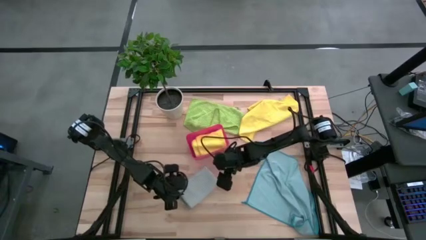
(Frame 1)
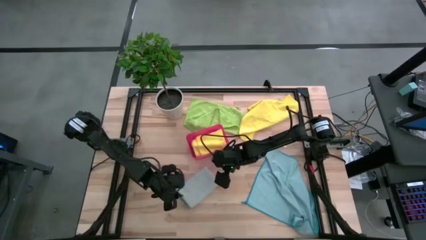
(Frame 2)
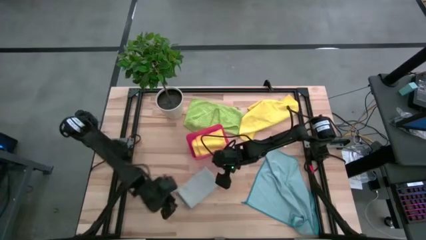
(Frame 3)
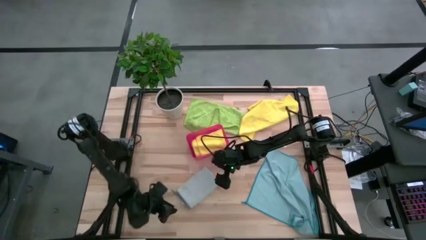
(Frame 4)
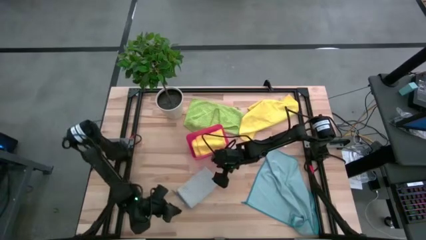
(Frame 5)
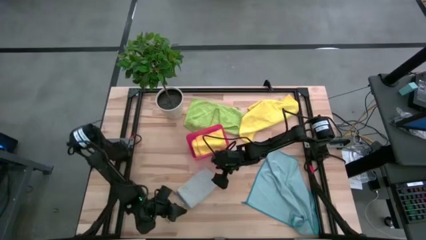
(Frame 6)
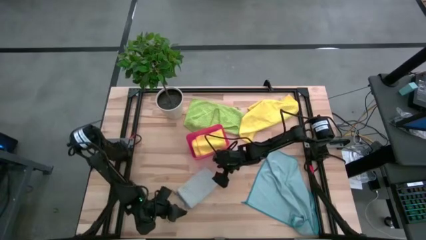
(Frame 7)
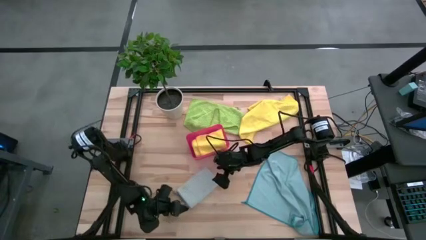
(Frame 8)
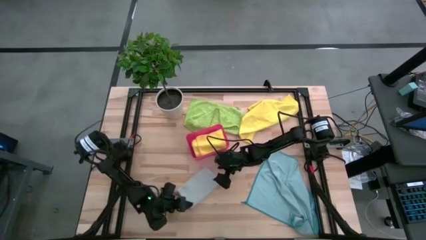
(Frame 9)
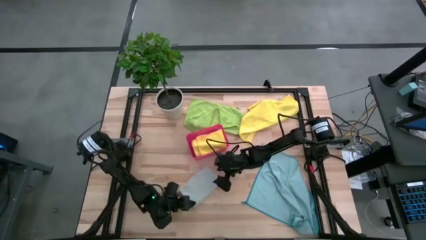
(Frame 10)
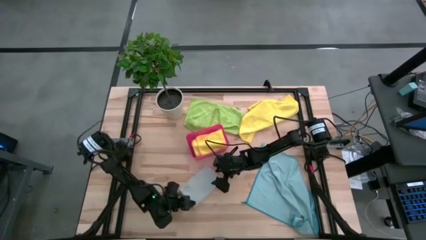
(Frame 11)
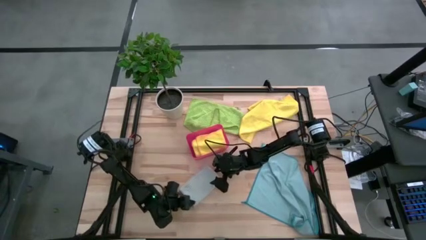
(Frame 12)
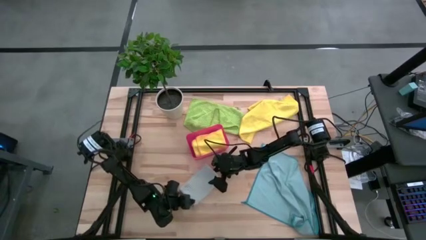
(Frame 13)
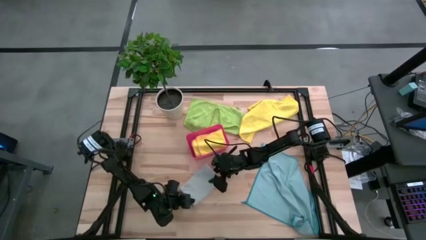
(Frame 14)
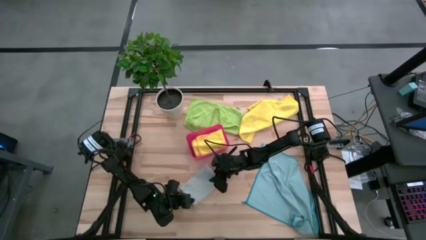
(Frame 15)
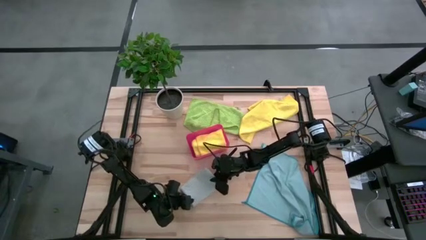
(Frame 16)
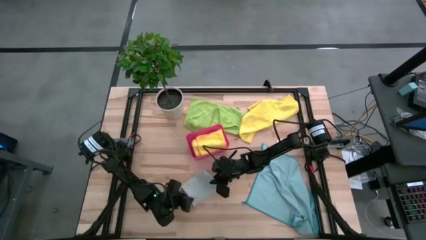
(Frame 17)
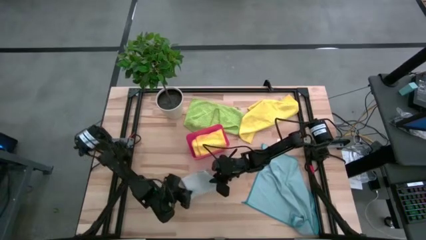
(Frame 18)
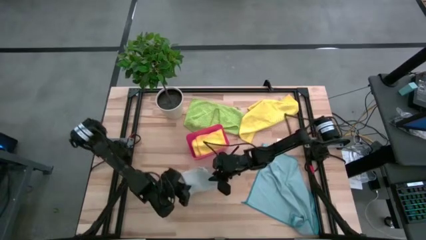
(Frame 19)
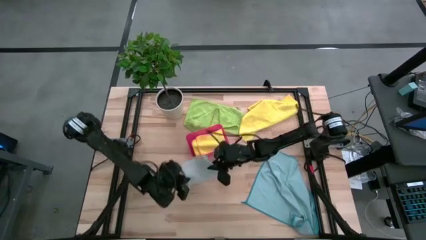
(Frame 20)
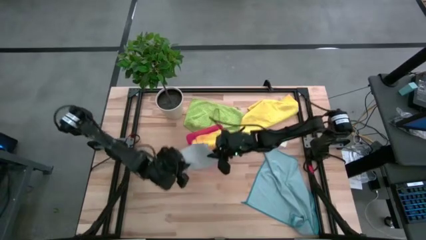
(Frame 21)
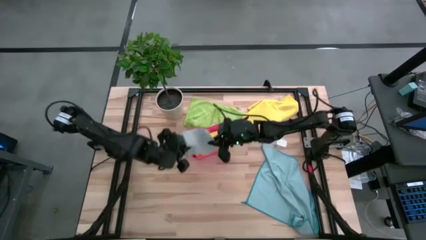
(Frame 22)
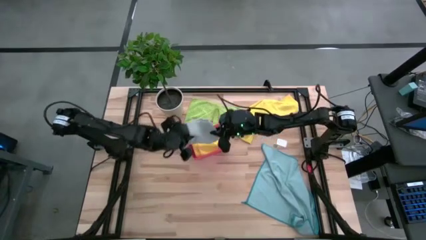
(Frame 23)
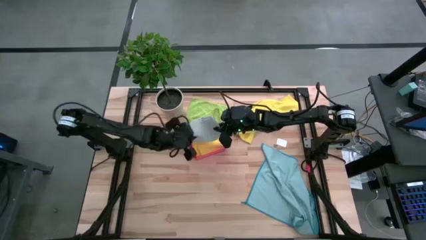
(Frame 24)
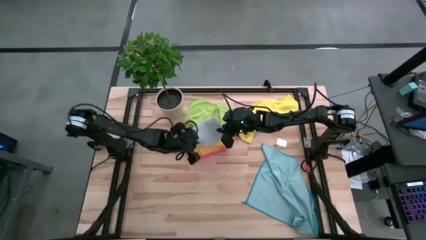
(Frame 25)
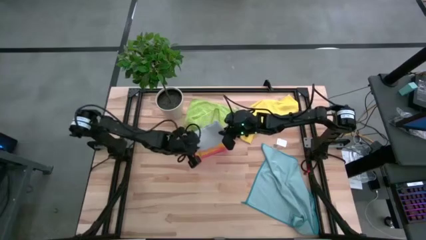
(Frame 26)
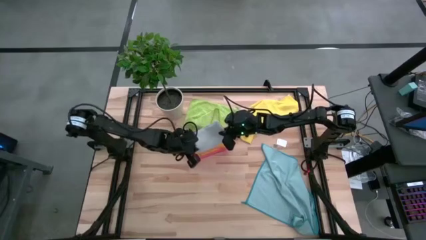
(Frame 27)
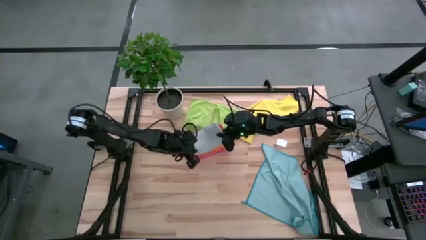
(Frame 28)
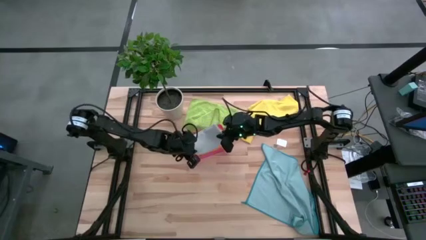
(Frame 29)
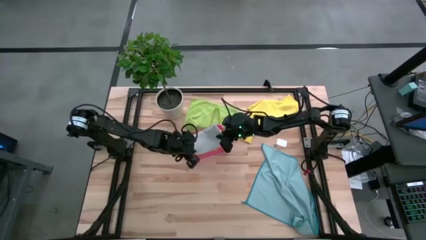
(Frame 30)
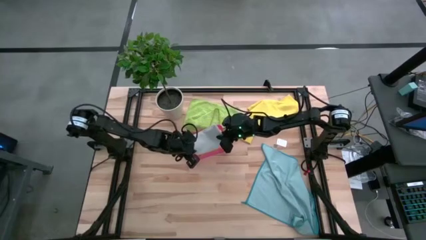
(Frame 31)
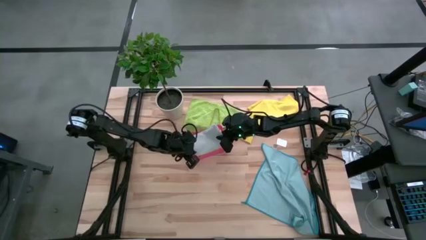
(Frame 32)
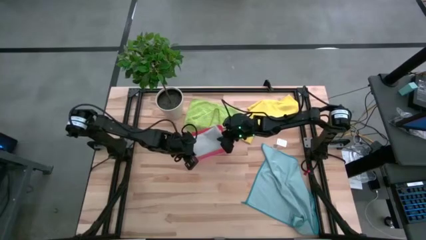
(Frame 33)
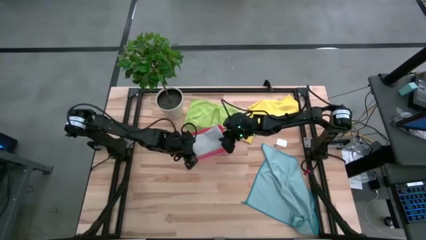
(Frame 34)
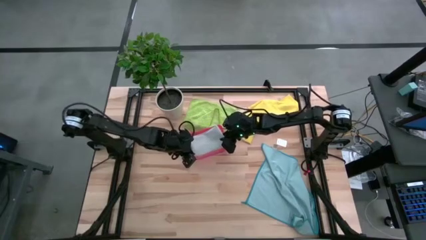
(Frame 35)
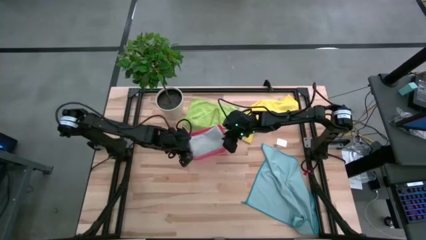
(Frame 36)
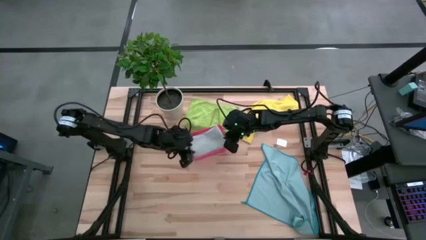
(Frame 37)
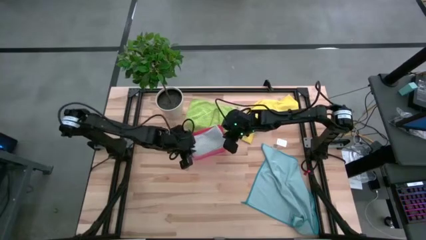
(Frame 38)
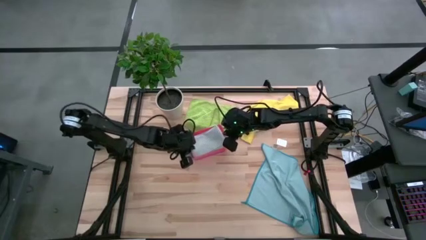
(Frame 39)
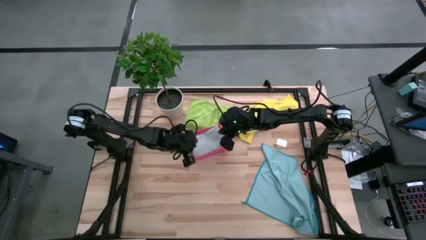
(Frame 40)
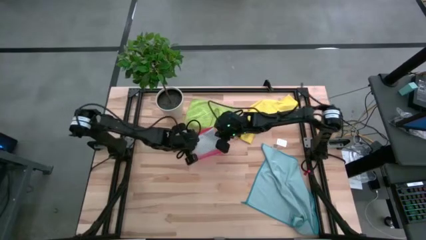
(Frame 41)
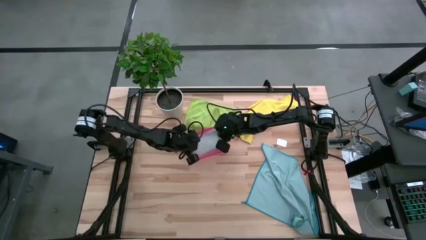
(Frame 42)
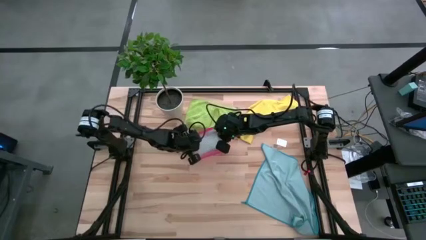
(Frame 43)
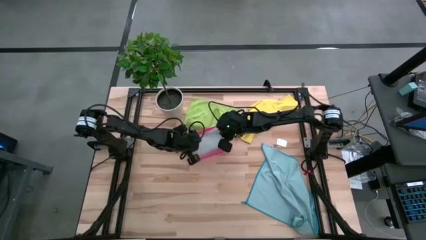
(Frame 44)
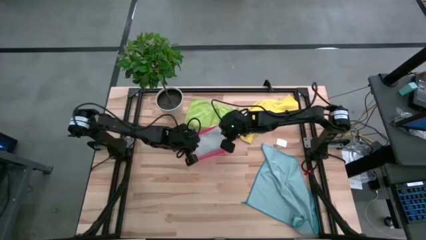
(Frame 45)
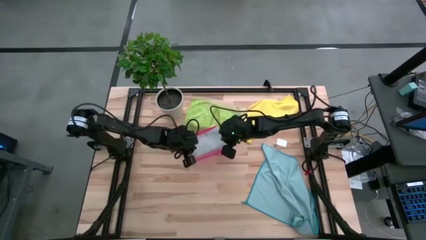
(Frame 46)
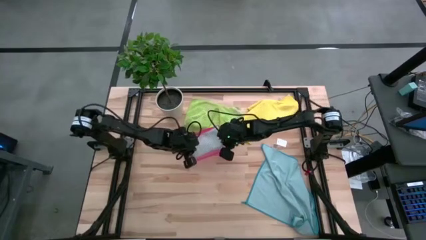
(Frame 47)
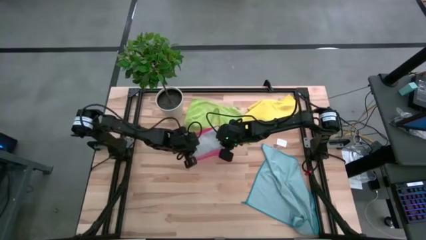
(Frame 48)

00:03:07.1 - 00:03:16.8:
Task: Fold microfiber towels
Put the folded gray towel into the pink bin

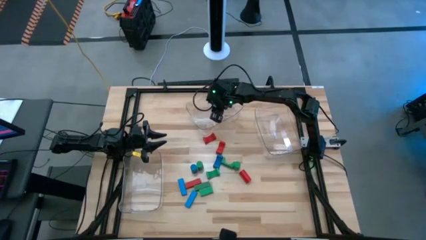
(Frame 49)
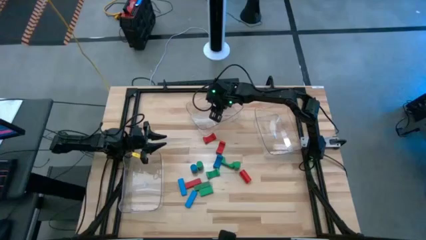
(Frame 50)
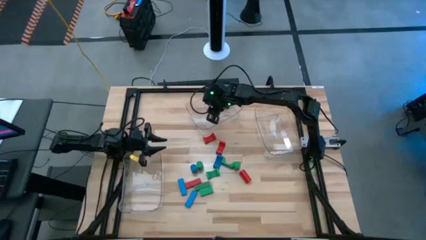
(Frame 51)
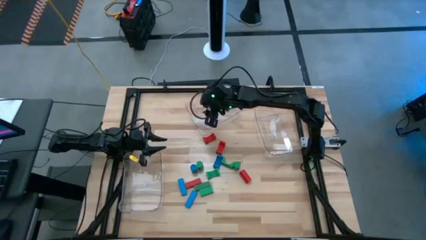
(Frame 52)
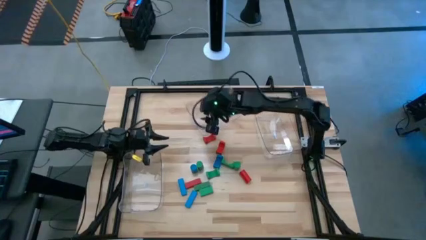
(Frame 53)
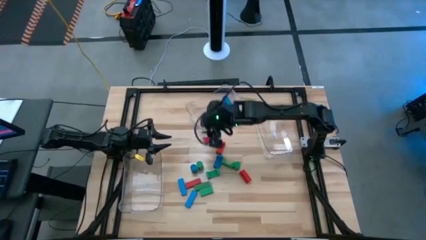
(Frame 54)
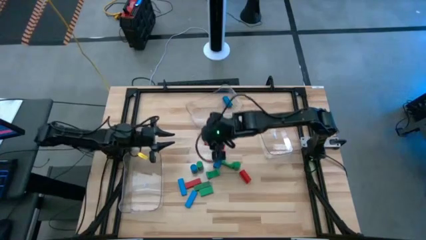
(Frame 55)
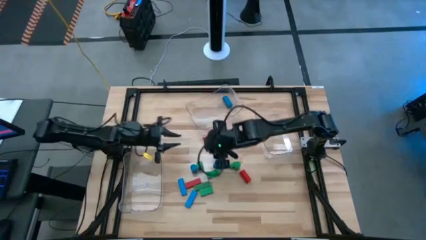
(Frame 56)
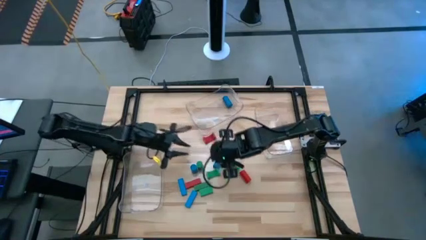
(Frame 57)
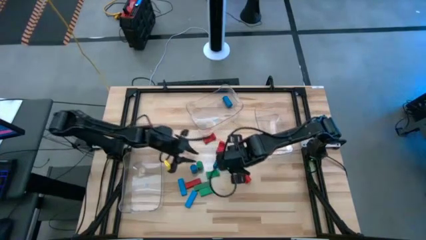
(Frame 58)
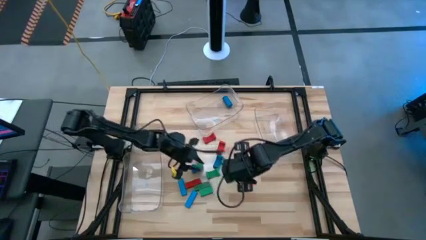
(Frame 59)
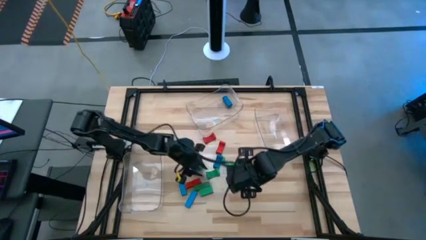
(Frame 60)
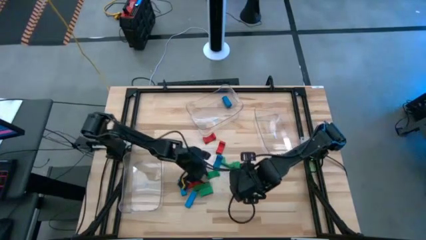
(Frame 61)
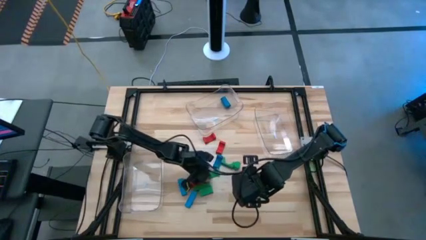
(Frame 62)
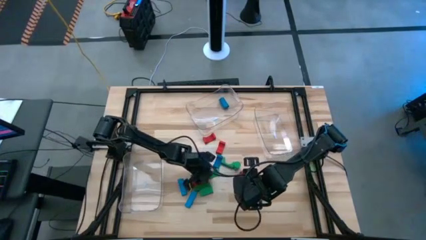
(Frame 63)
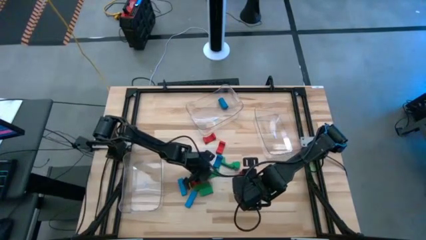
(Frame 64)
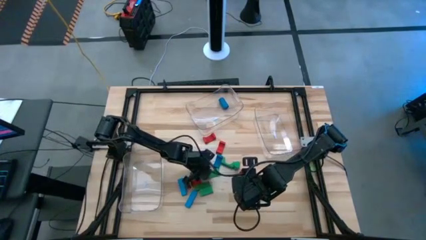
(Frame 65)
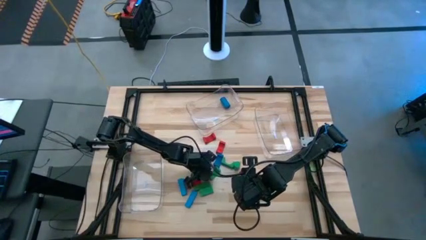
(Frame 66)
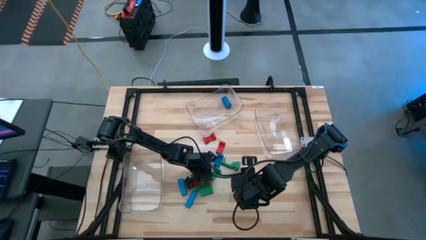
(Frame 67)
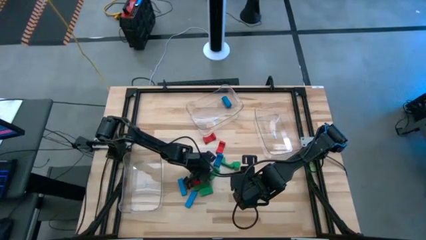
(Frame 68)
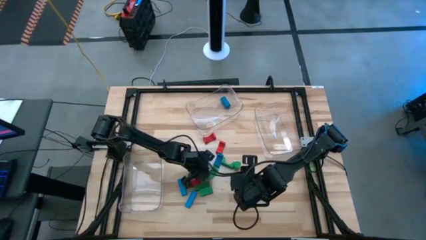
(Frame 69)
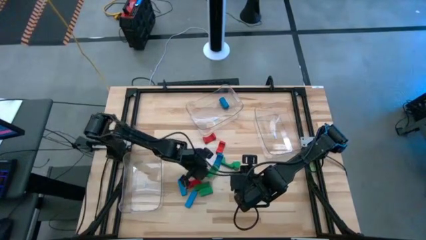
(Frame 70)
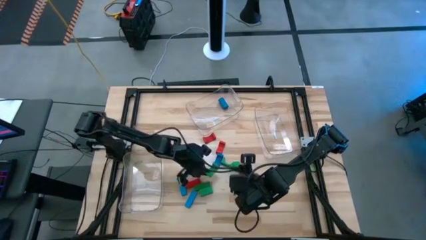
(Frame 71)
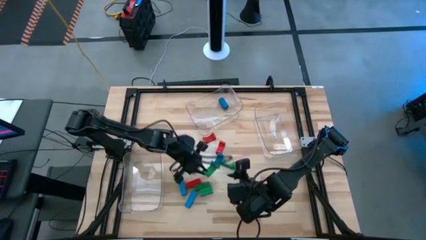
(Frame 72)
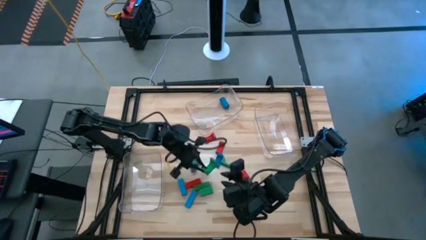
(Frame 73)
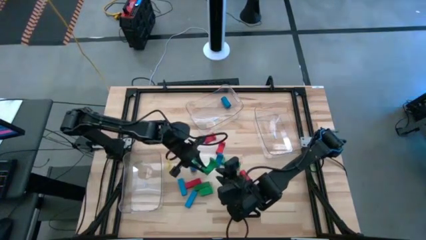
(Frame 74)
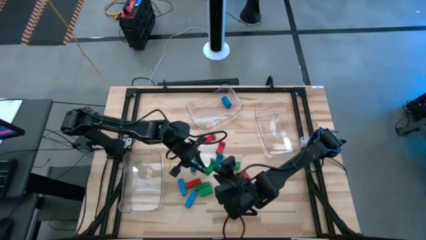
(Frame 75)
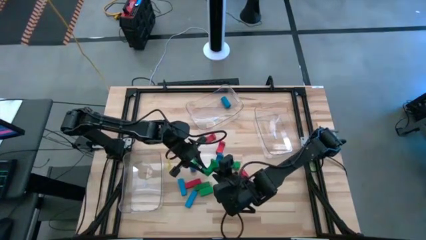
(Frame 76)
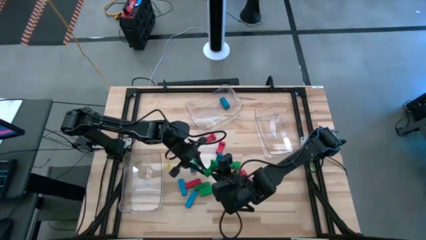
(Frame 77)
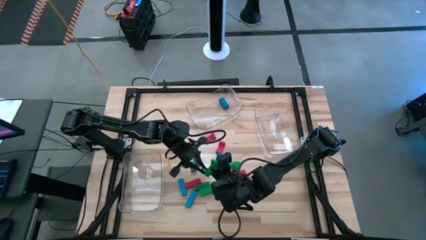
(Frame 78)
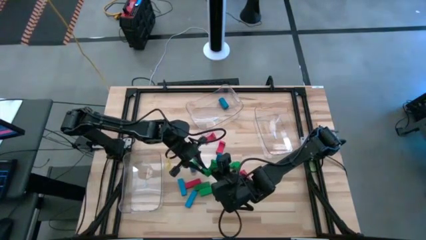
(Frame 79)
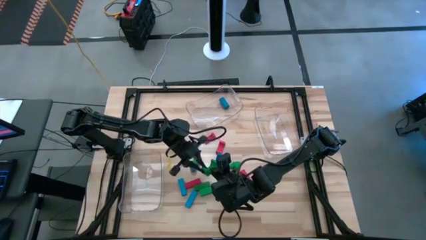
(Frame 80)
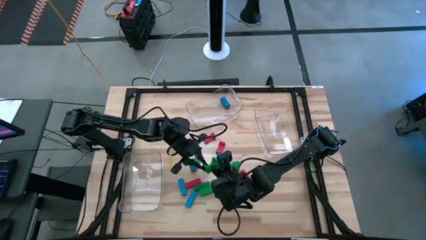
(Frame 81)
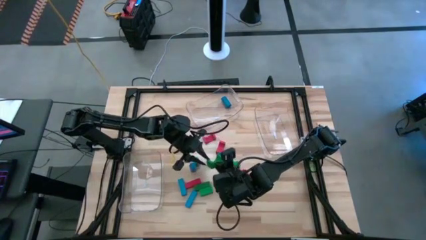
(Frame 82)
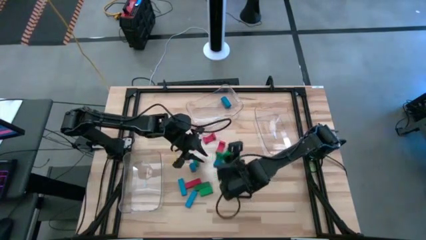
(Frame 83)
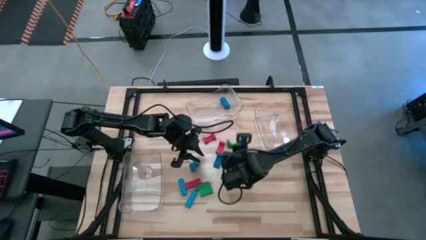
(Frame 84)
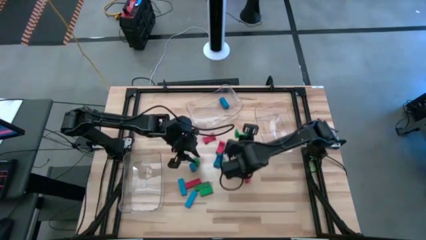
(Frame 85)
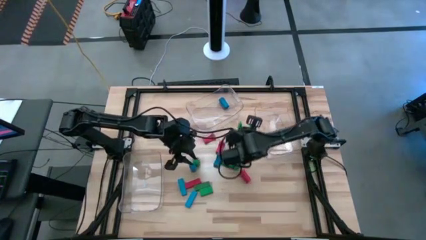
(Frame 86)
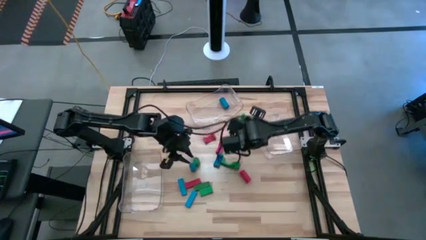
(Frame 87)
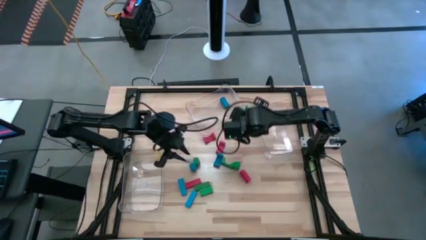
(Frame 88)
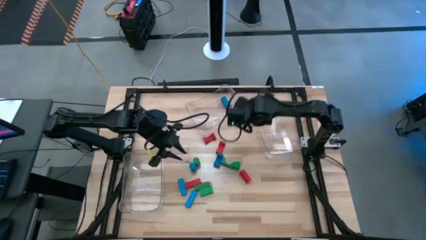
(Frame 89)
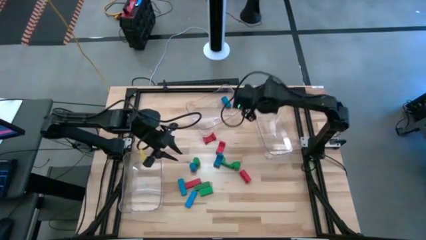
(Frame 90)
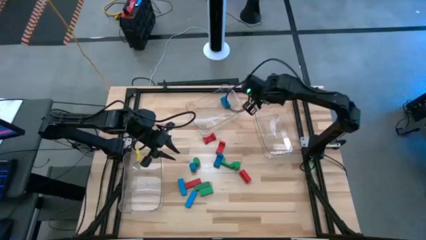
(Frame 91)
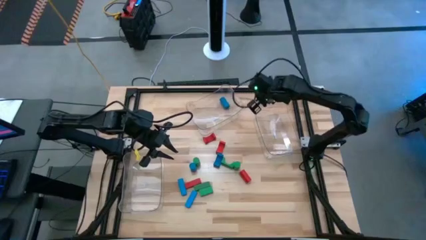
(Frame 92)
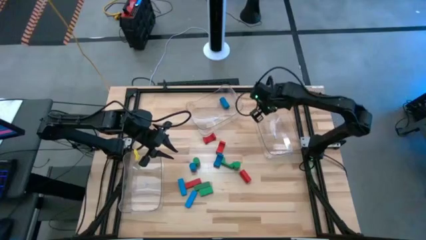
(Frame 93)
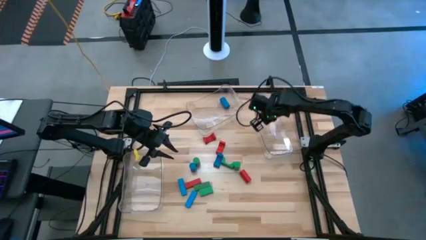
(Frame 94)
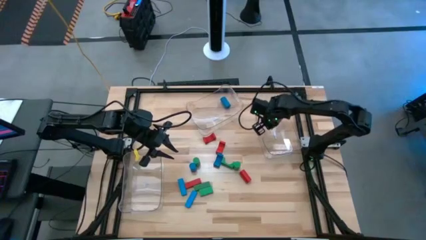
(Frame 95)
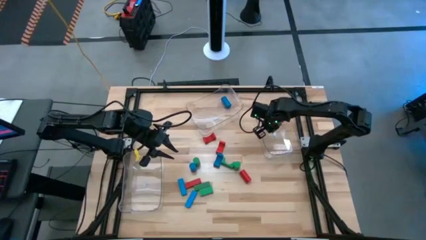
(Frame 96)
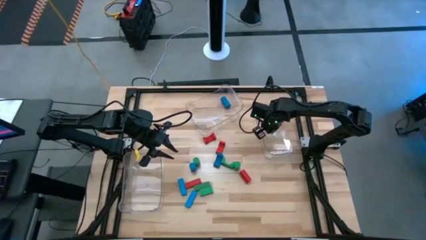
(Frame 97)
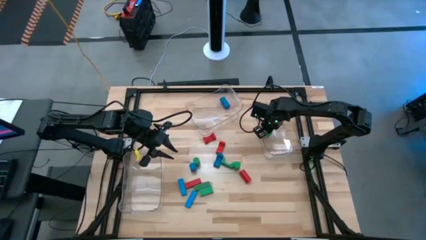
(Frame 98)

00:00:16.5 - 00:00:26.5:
Task: Sort blocks by size
Put the left green arch block into the right transparent bin
